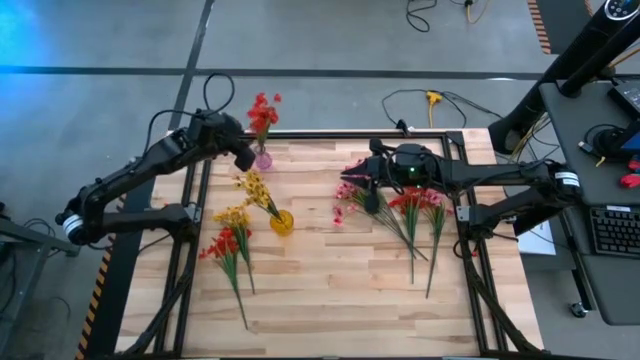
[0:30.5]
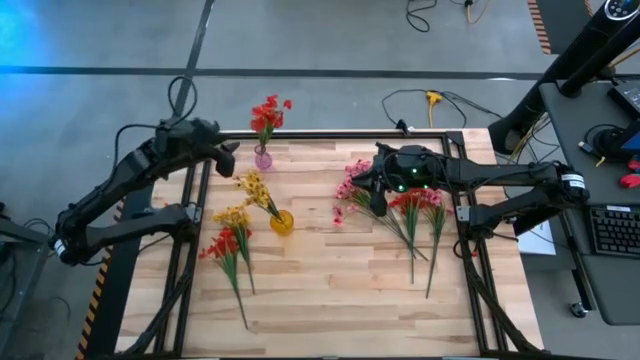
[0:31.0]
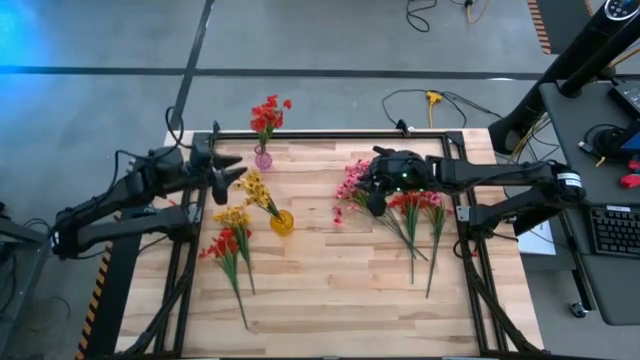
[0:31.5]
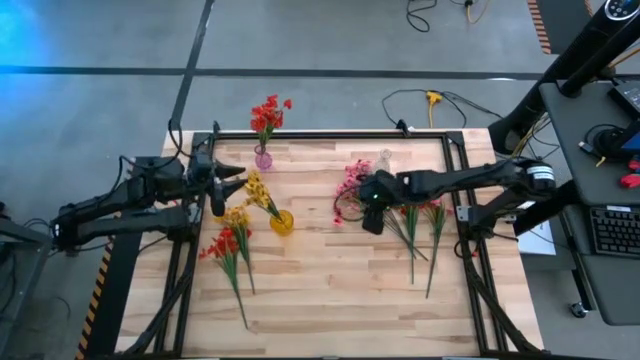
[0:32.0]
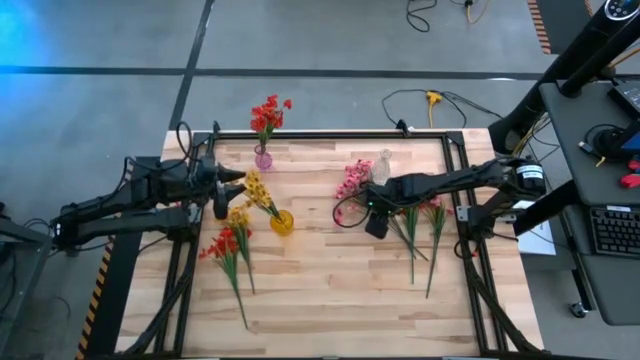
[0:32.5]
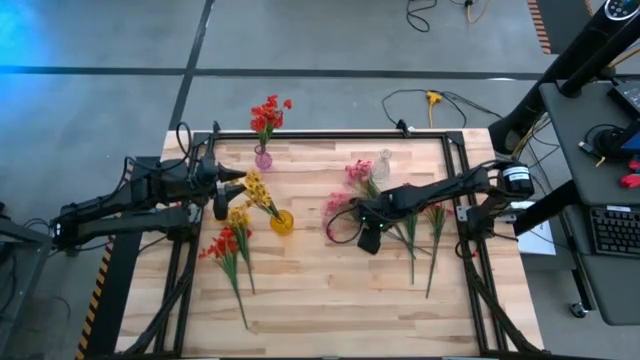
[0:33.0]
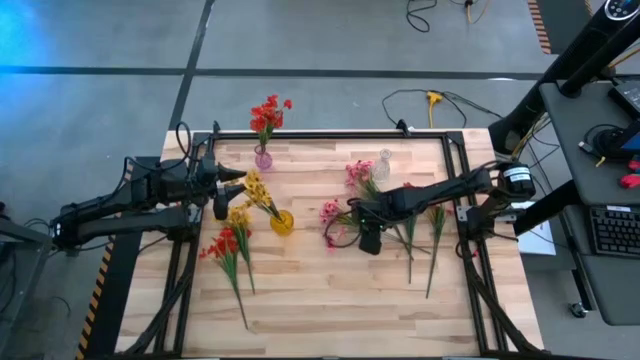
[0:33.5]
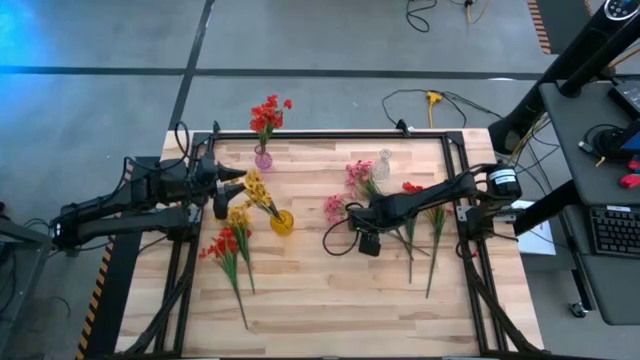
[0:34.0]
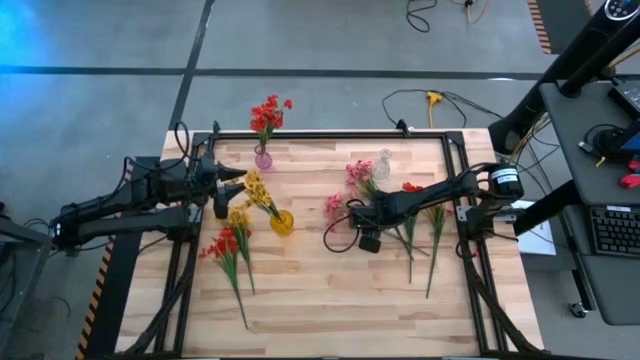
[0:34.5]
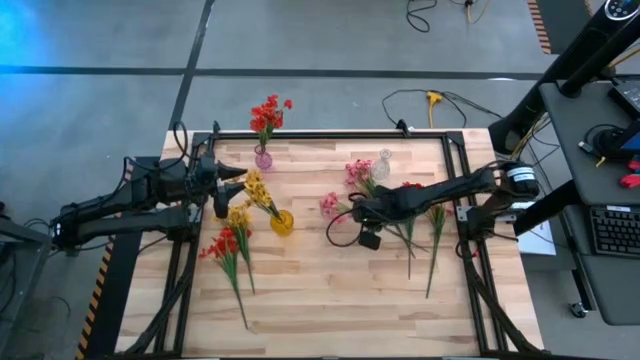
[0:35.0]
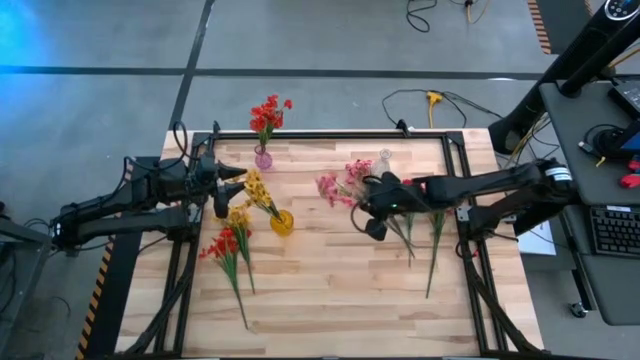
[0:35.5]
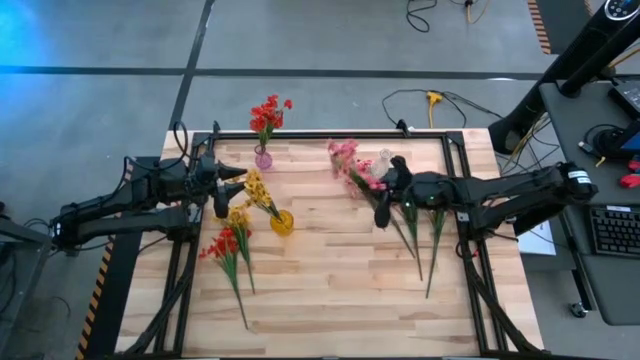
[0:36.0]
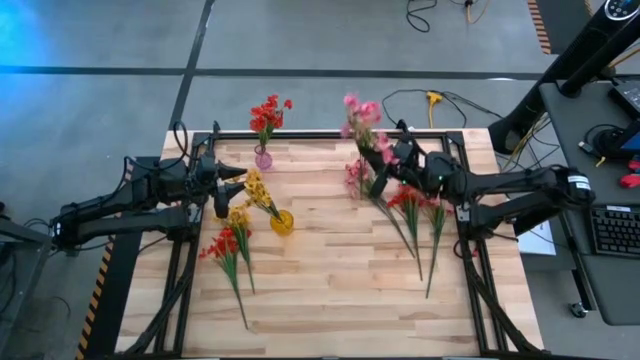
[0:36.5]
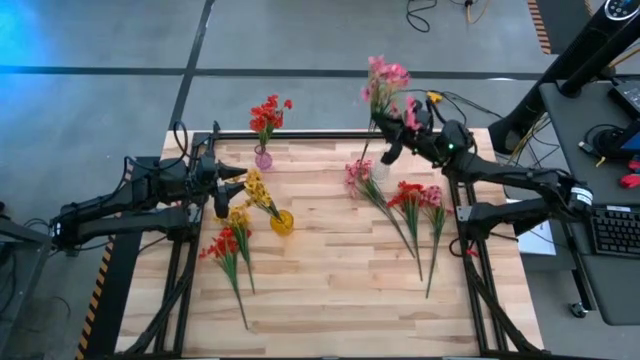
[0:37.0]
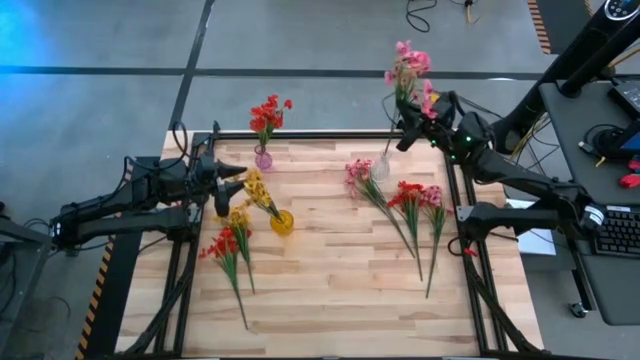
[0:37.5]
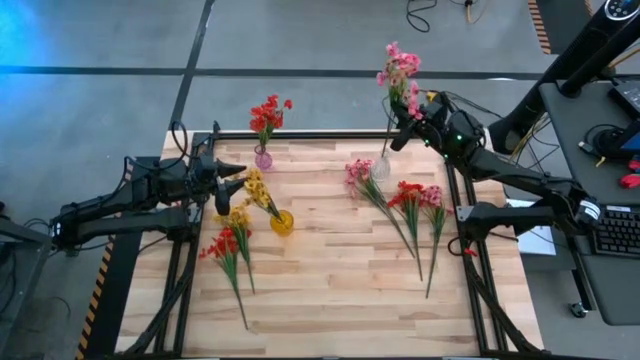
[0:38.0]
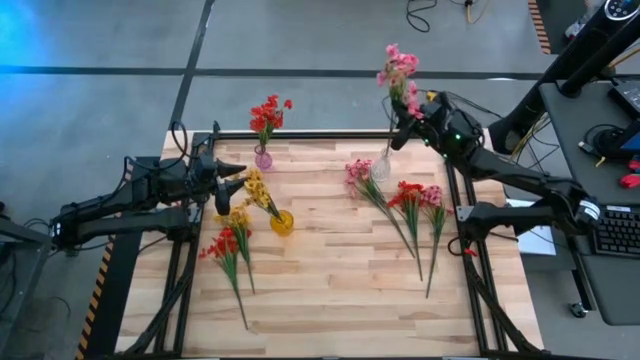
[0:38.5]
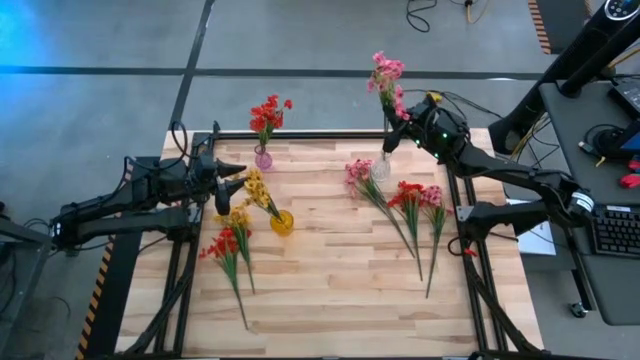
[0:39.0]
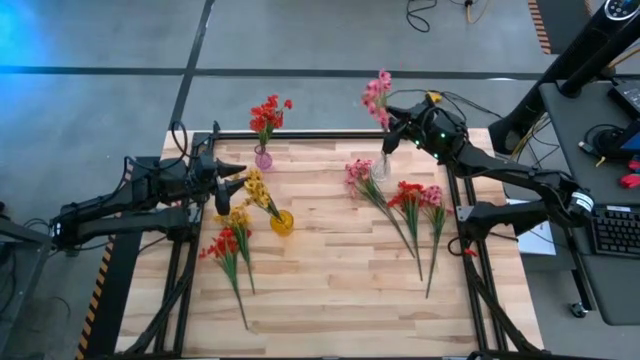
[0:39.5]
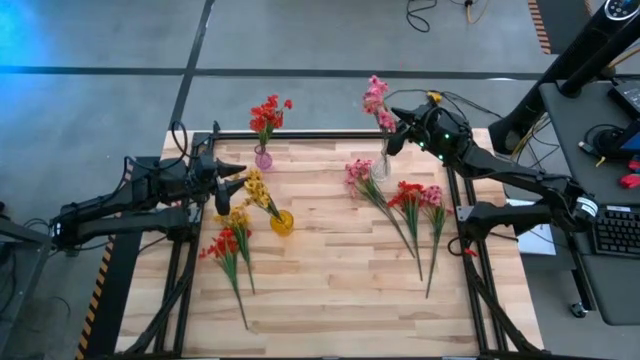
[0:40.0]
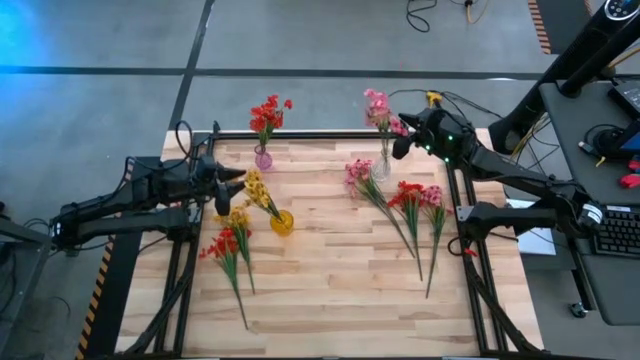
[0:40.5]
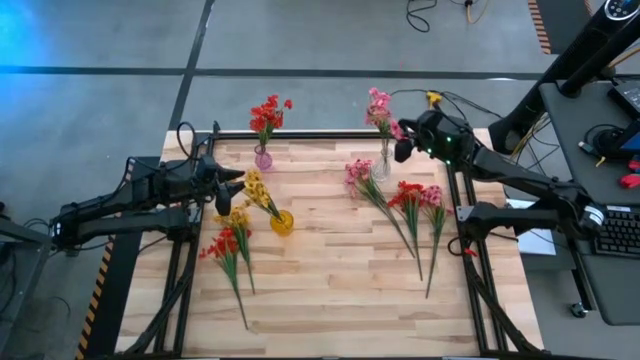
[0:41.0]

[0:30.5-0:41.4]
Task: Sort flowers into vase by color
Put the left pink flower into the transparent flower vase
